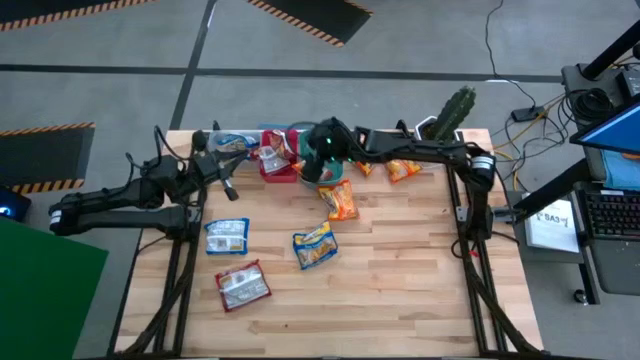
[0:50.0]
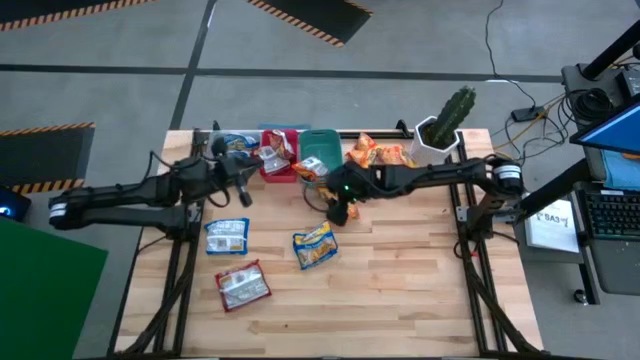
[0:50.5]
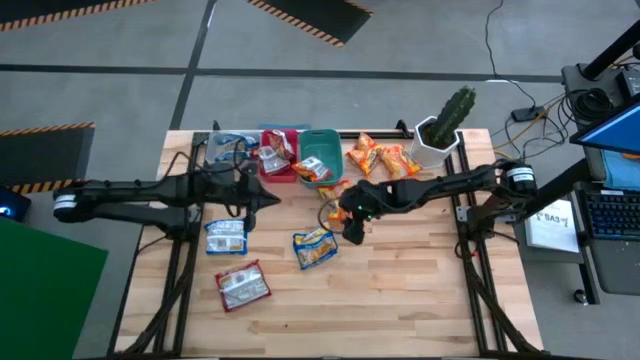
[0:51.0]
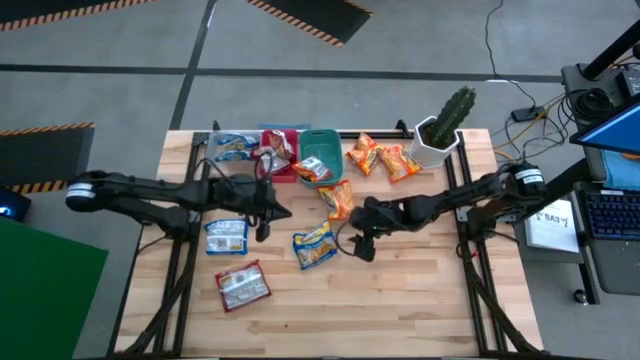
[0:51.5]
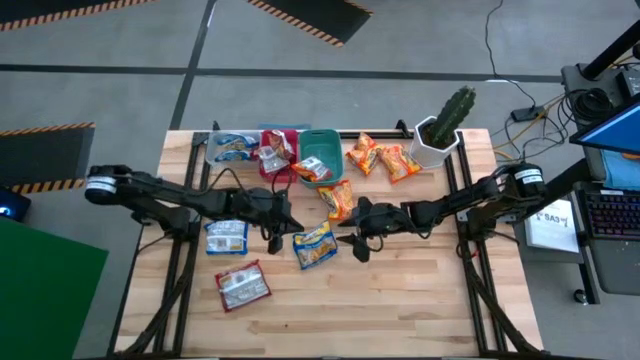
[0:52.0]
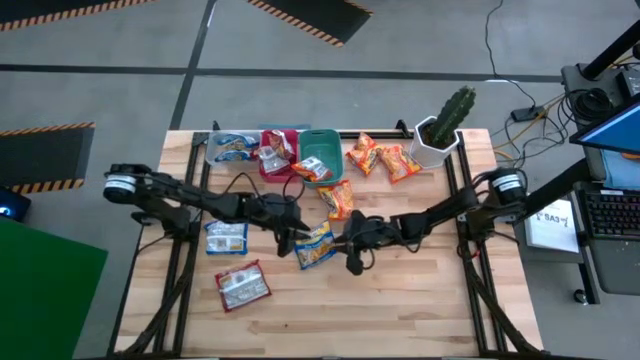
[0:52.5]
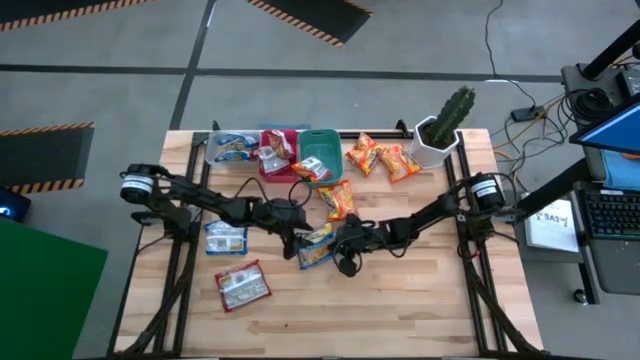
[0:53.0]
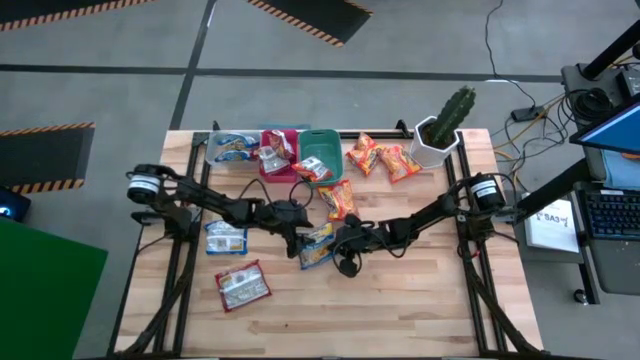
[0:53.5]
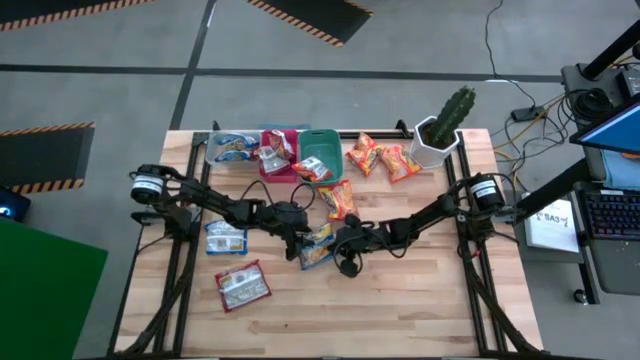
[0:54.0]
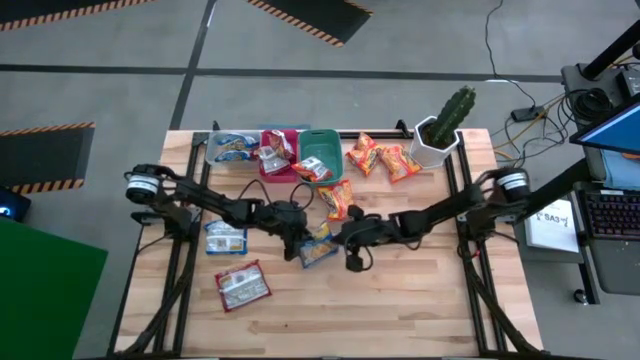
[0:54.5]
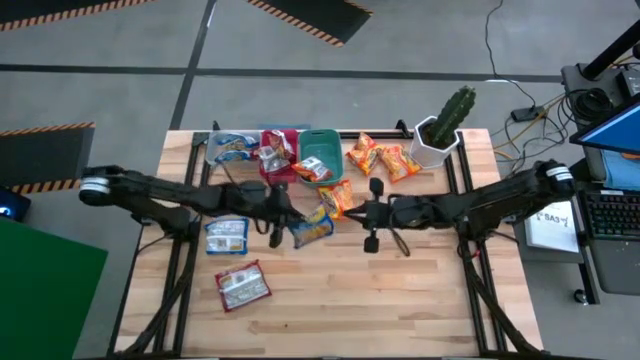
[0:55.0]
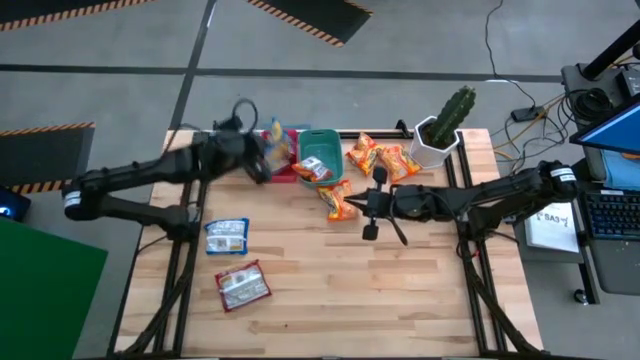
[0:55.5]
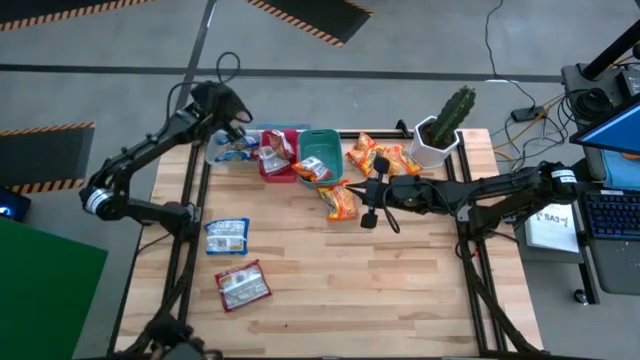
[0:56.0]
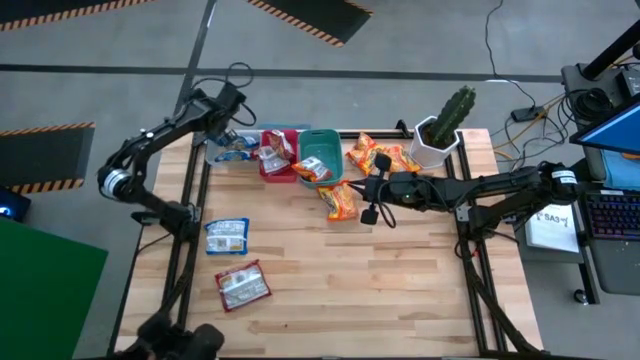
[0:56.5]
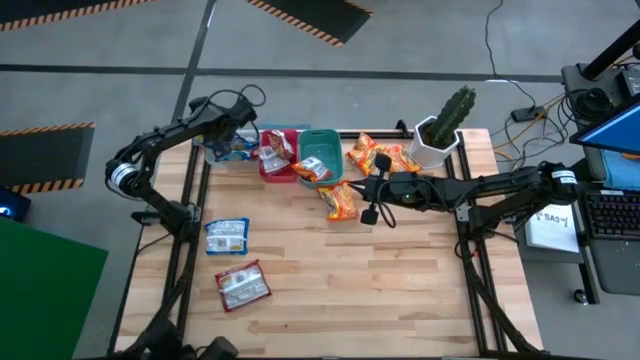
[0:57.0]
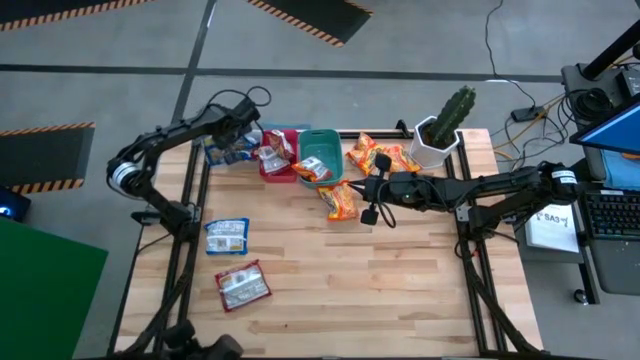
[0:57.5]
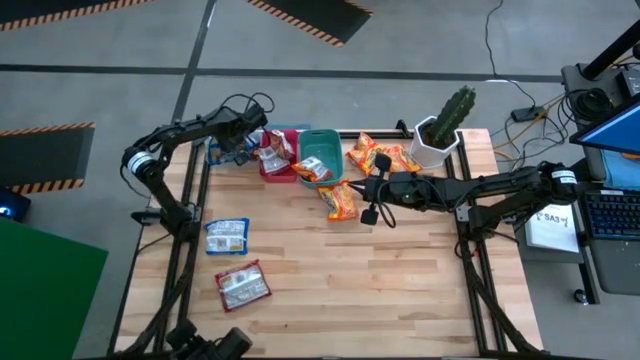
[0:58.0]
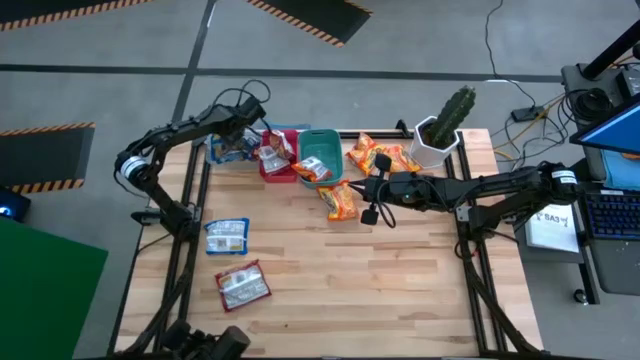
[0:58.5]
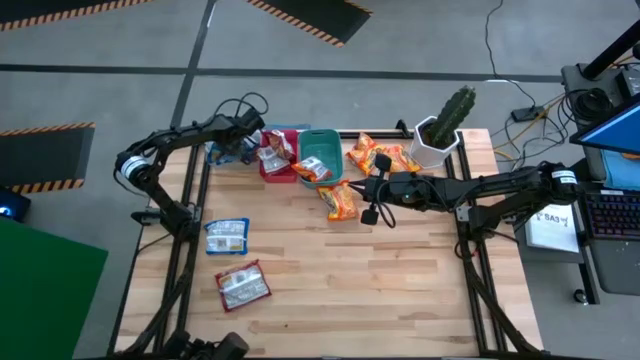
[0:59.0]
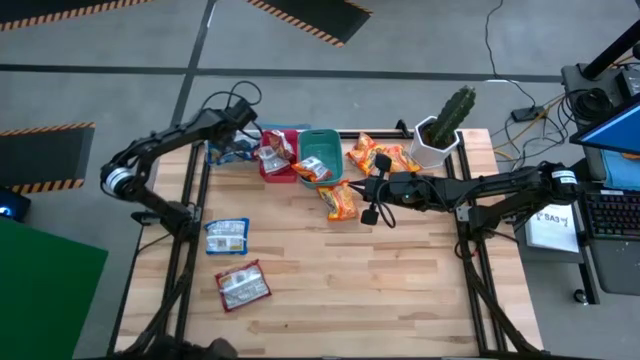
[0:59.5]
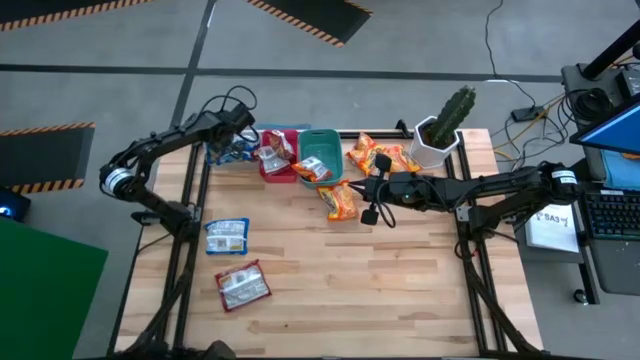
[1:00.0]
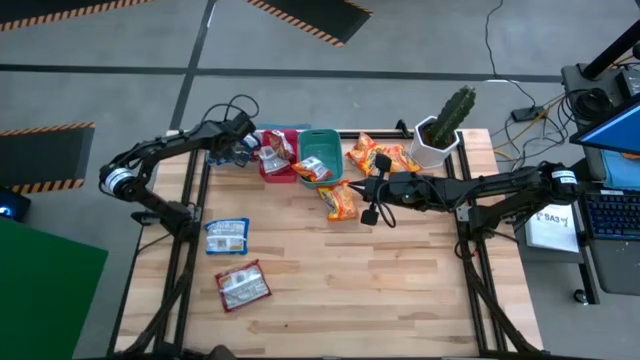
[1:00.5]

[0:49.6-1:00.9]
Task: Sort Maruchan noodles
Put the blue noodle pack into the transparent bin

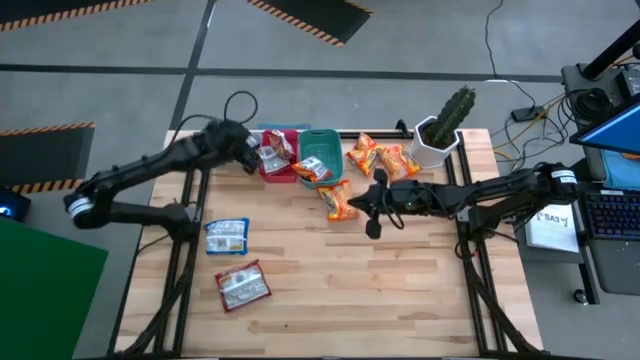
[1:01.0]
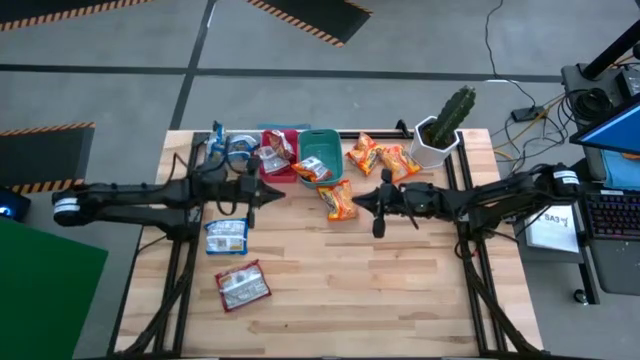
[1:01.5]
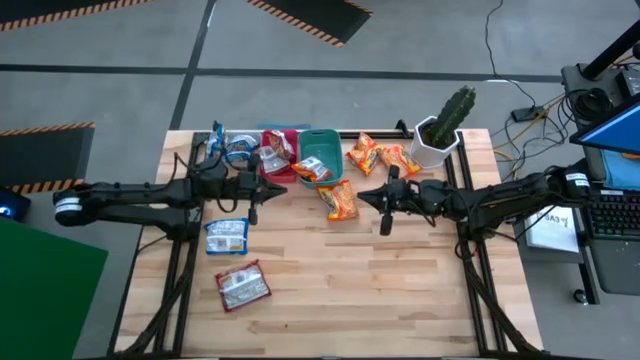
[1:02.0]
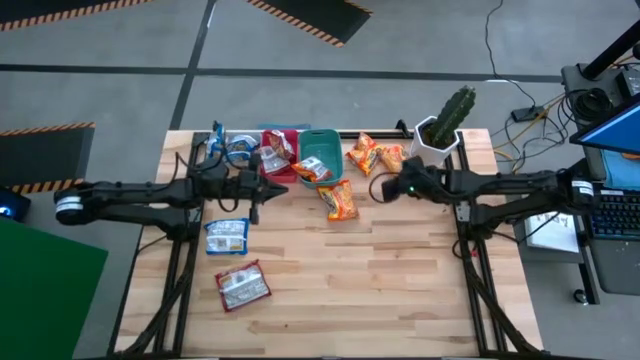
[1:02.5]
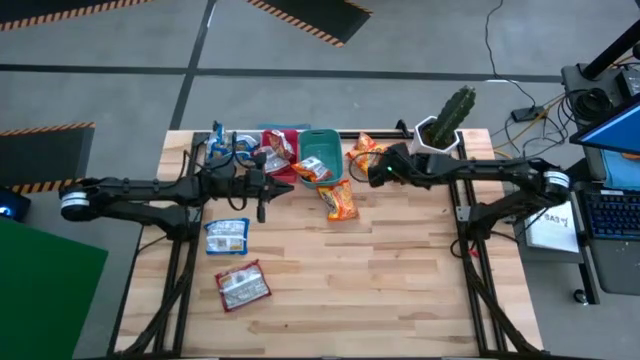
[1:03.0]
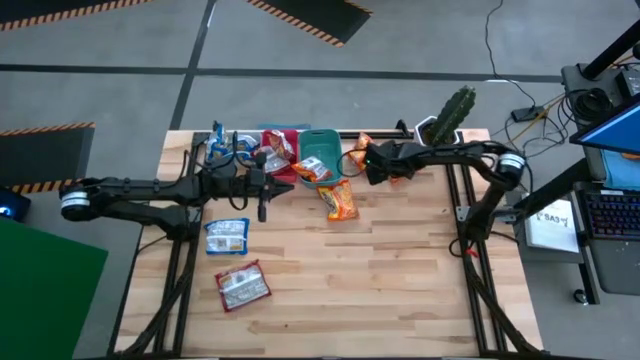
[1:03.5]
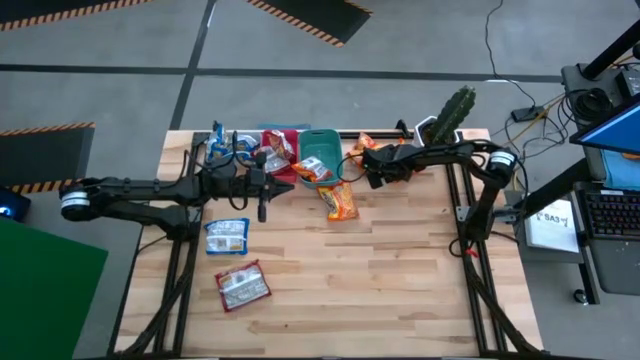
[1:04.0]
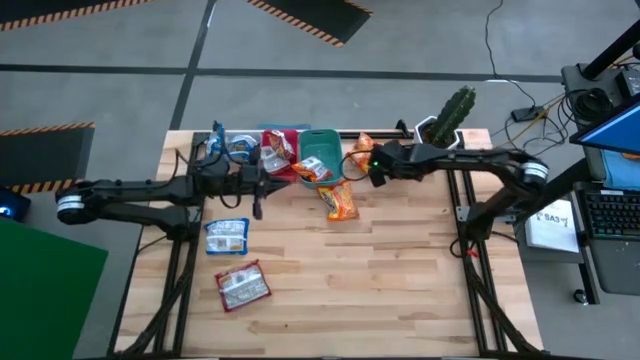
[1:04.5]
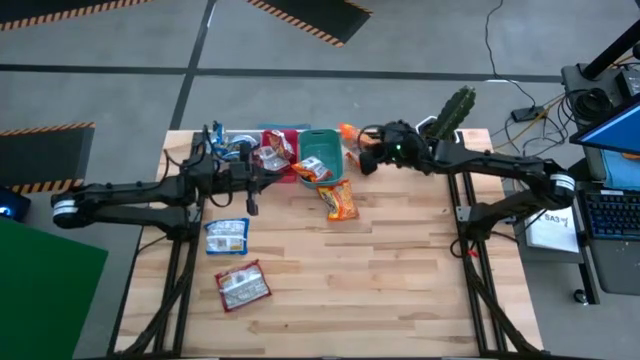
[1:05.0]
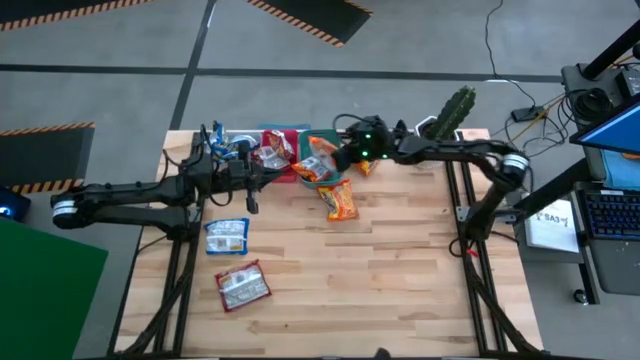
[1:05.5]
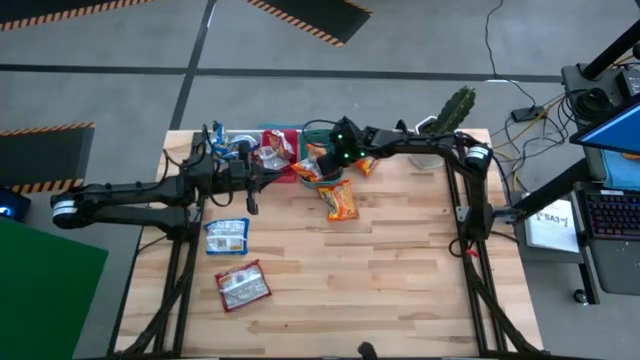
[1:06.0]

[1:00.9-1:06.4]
Put the orange noodle pack into the green bin

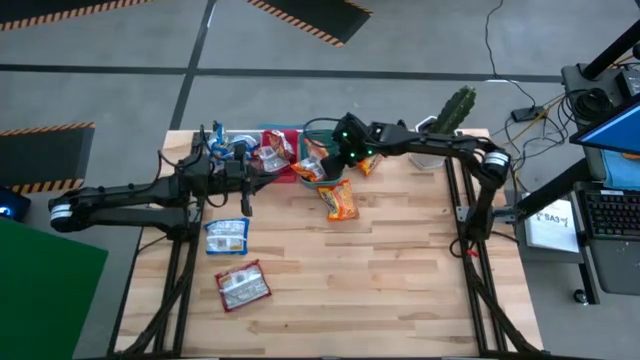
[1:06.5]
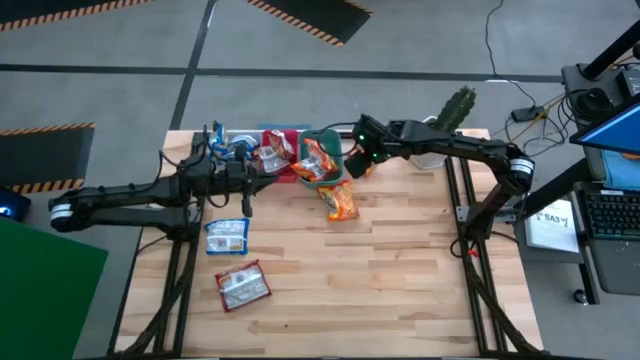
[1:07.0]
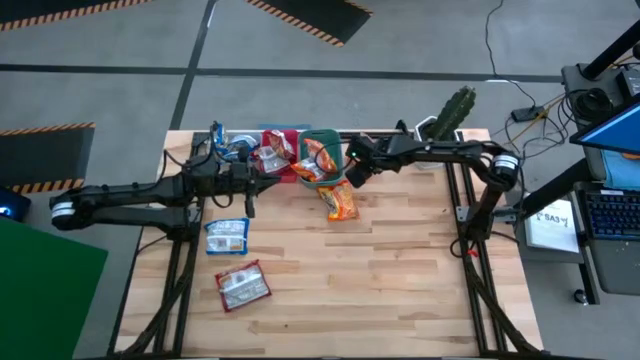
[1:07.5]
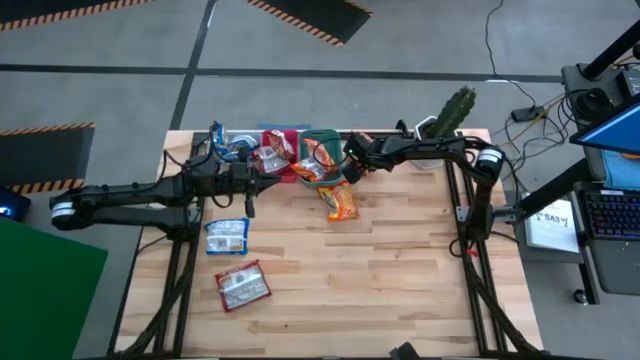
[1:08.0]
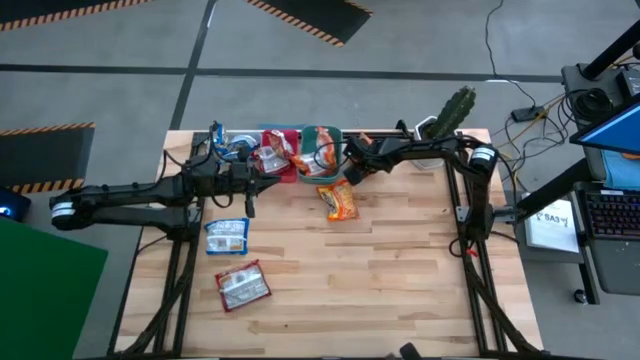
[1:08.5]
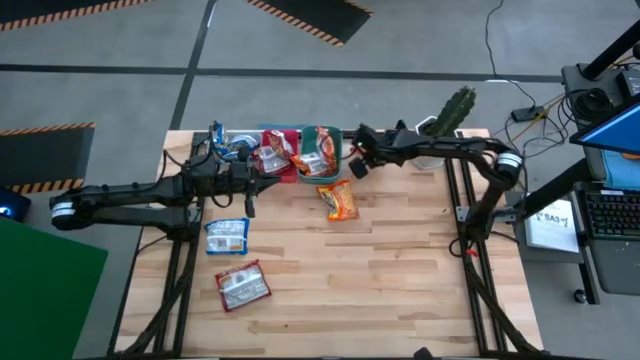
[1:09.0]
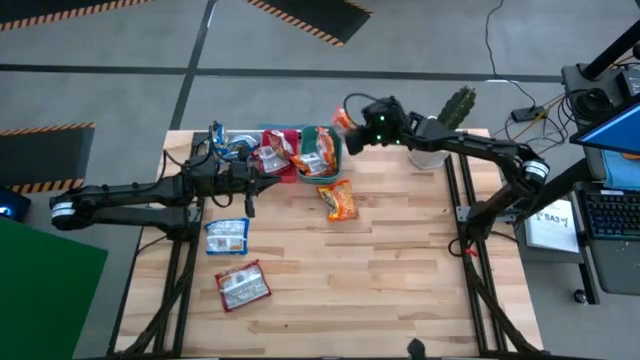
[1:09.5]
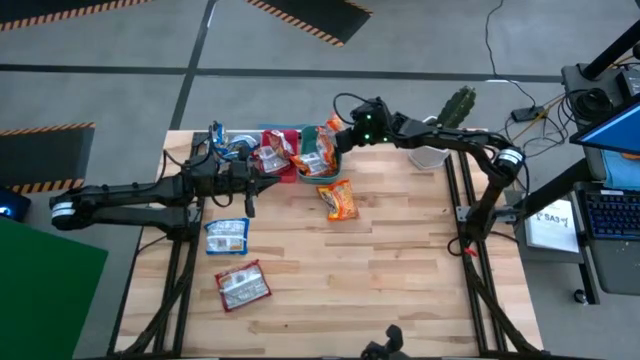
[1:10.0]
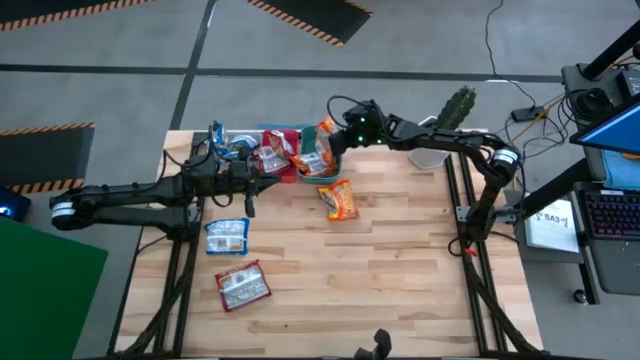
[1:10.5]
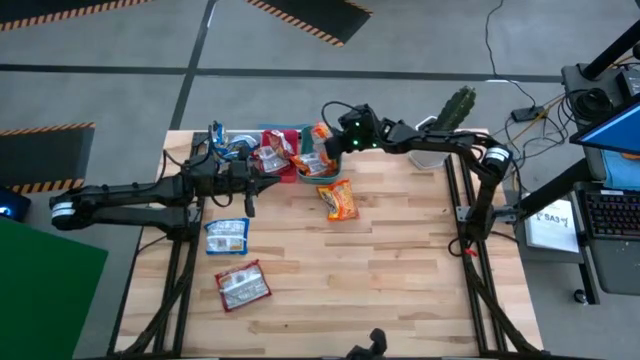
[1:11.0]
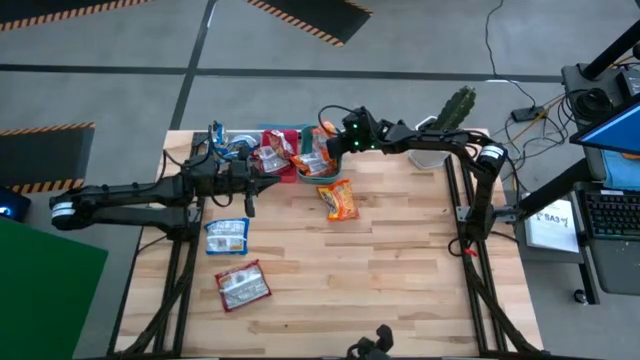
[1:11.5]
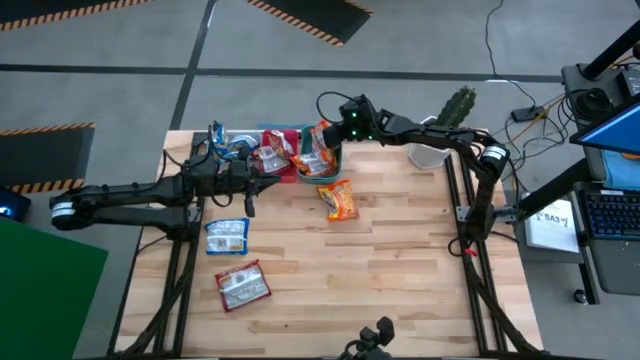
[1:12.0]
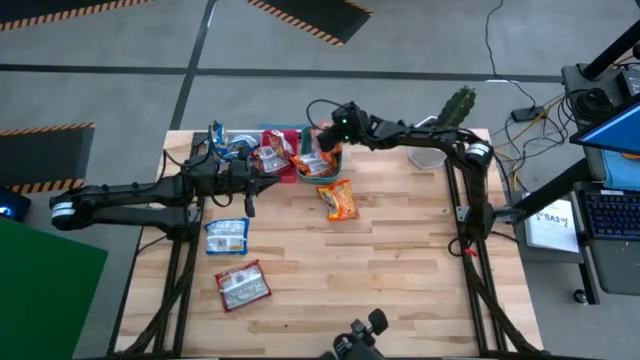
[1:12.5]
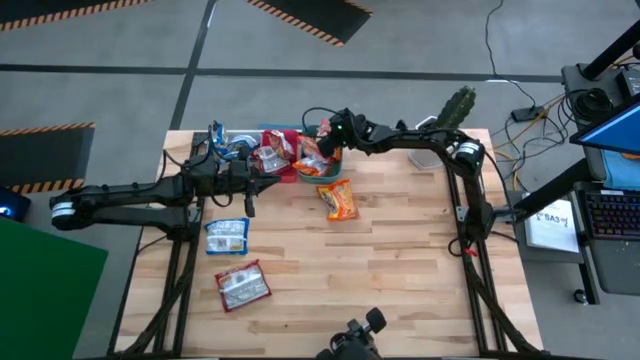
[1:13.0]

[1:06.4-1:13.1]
Put the orange noodle pack into the green bin
